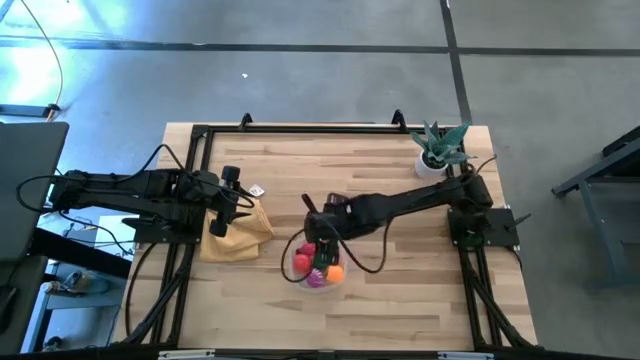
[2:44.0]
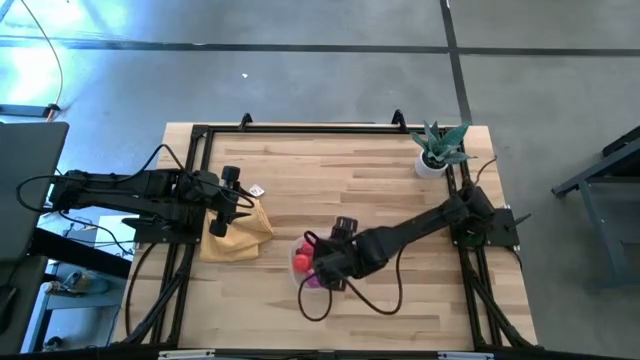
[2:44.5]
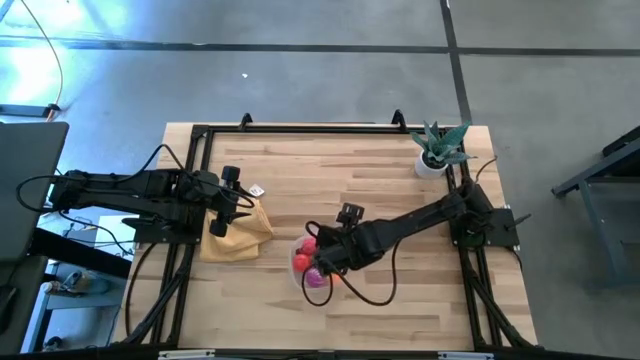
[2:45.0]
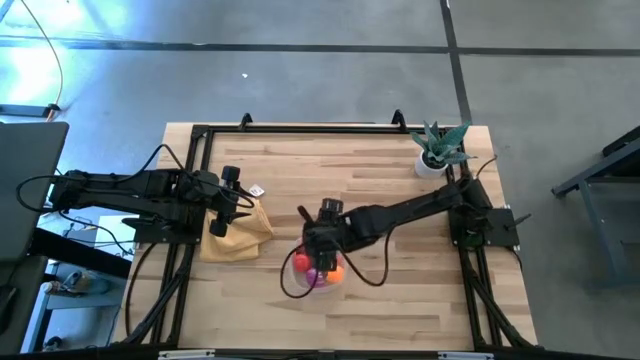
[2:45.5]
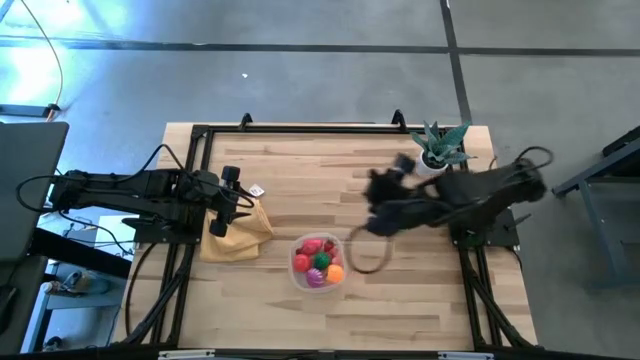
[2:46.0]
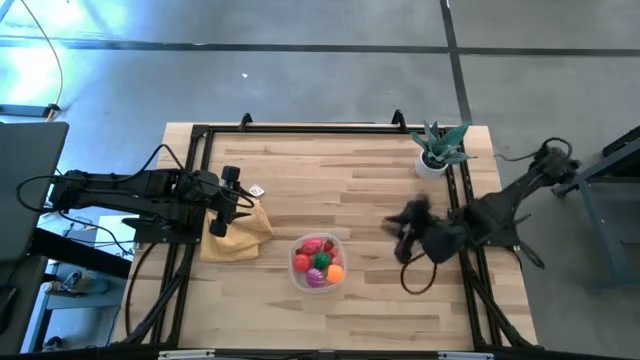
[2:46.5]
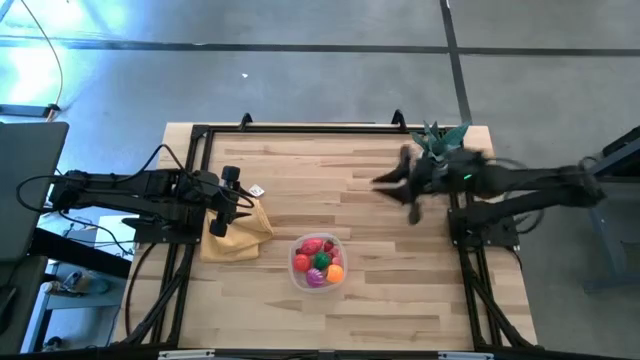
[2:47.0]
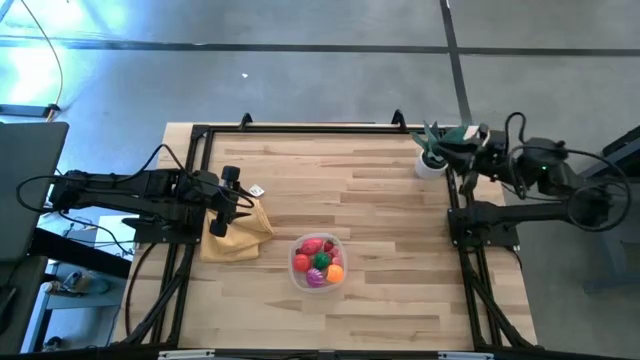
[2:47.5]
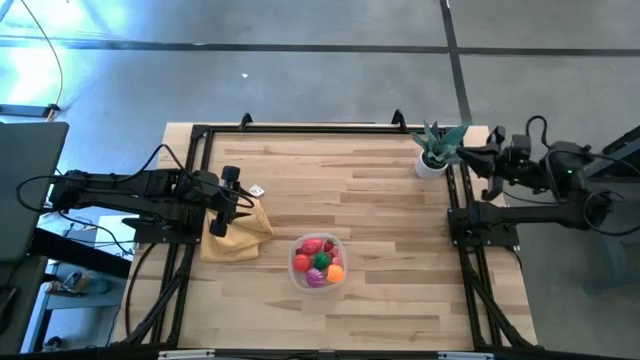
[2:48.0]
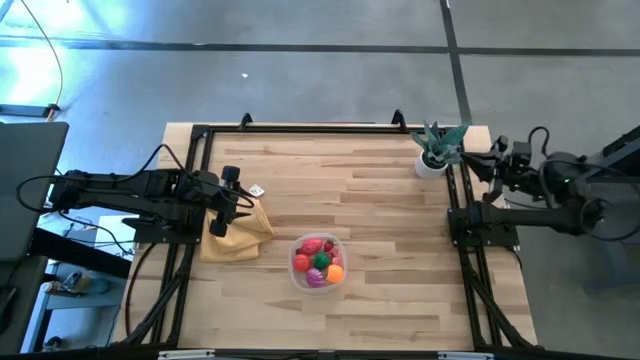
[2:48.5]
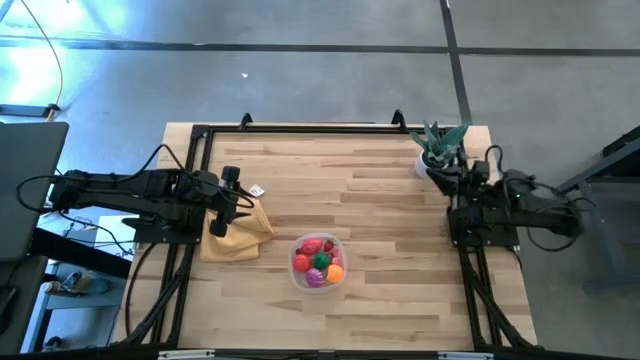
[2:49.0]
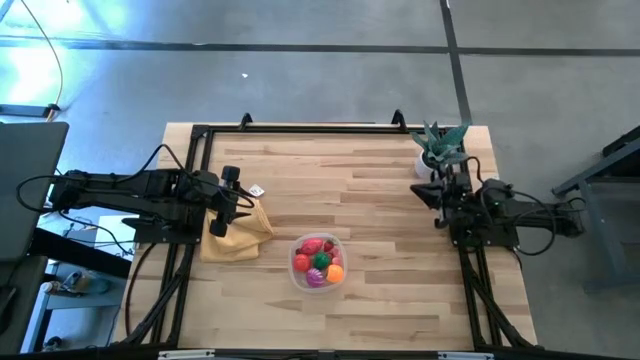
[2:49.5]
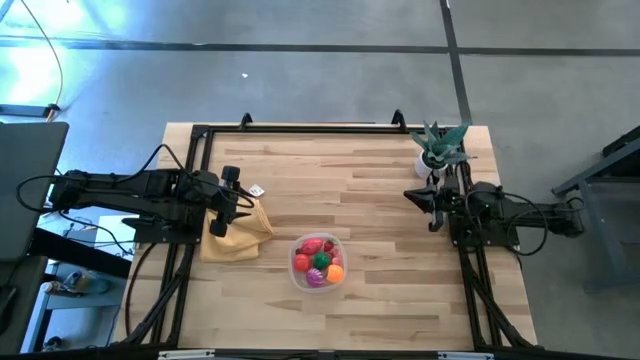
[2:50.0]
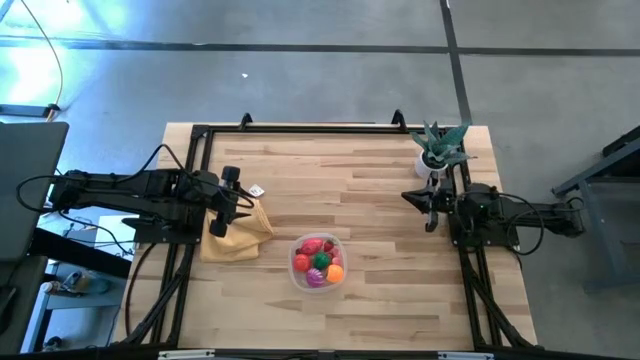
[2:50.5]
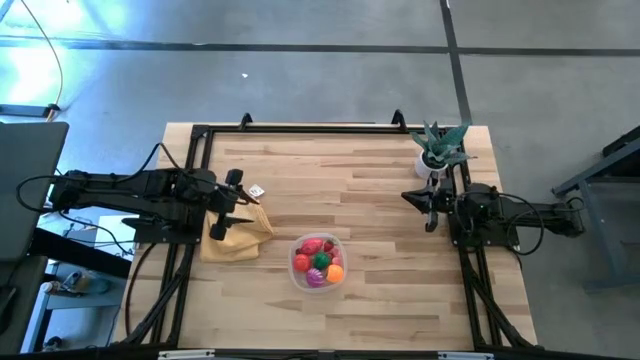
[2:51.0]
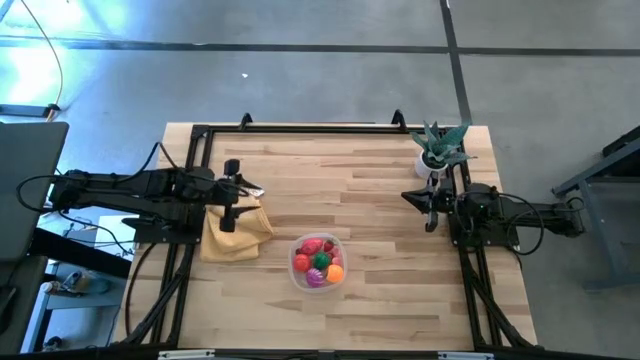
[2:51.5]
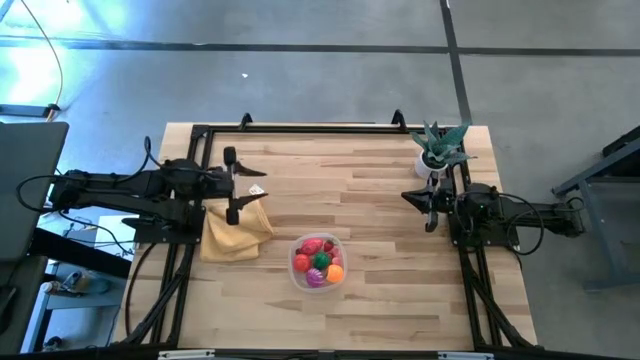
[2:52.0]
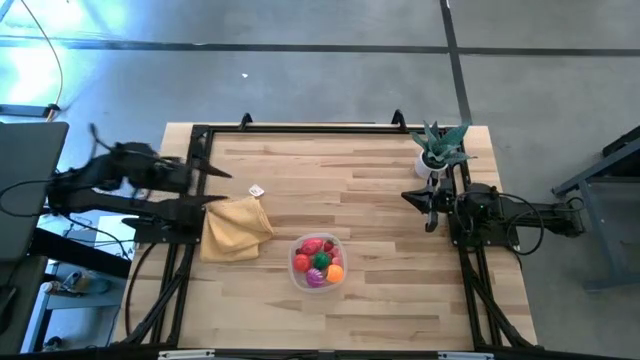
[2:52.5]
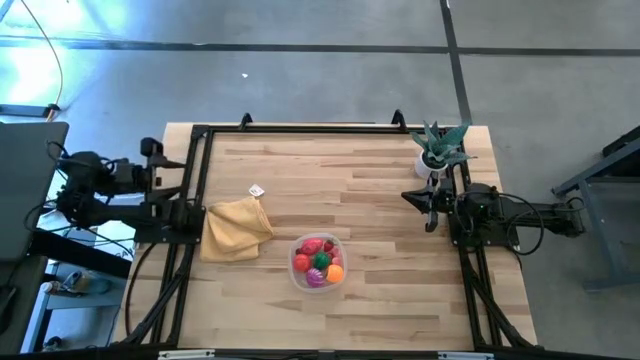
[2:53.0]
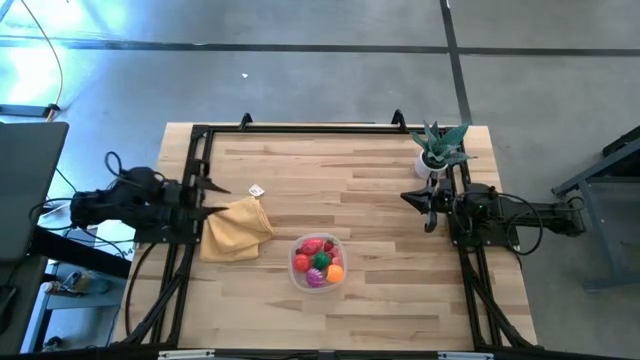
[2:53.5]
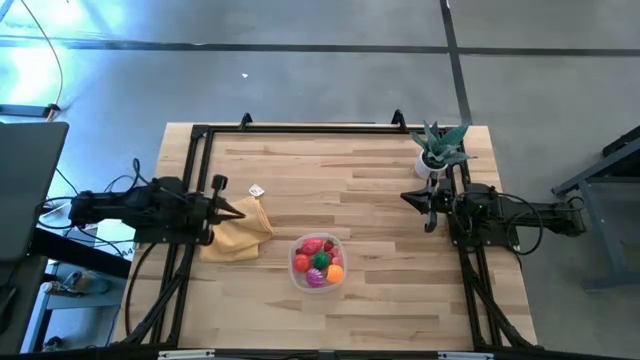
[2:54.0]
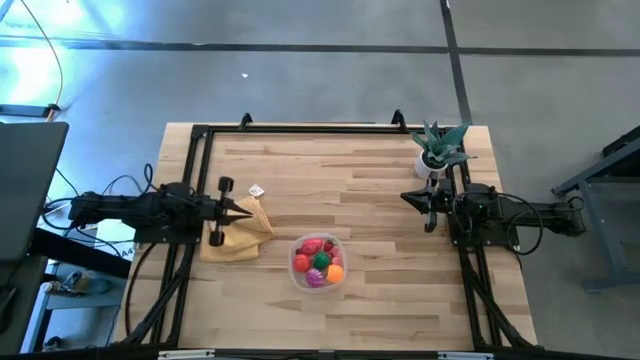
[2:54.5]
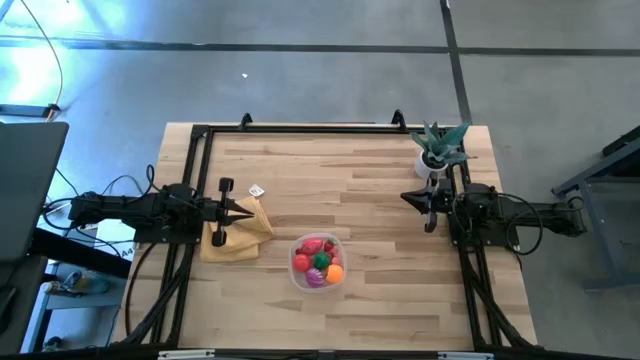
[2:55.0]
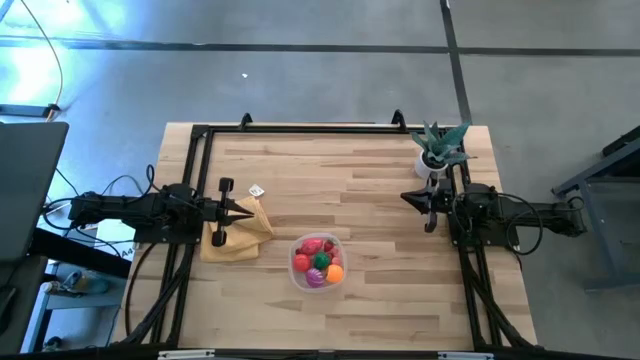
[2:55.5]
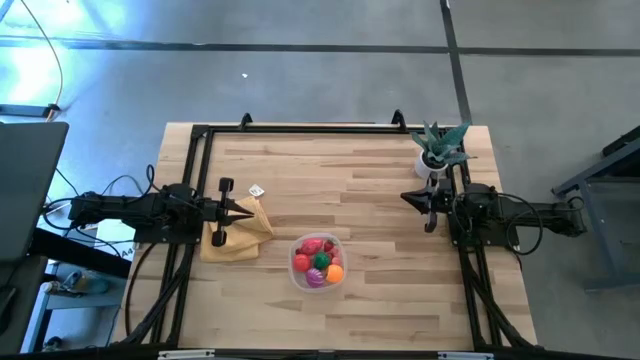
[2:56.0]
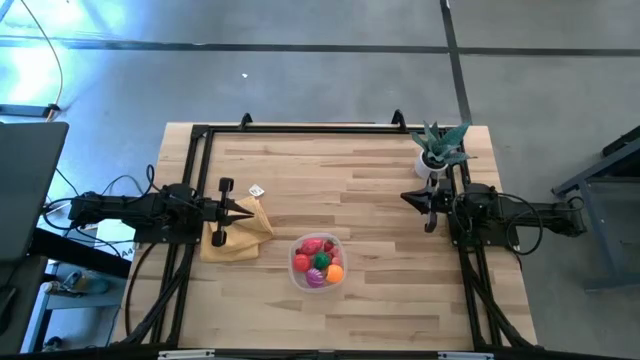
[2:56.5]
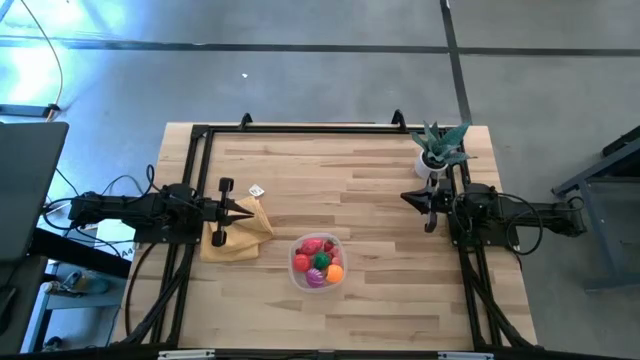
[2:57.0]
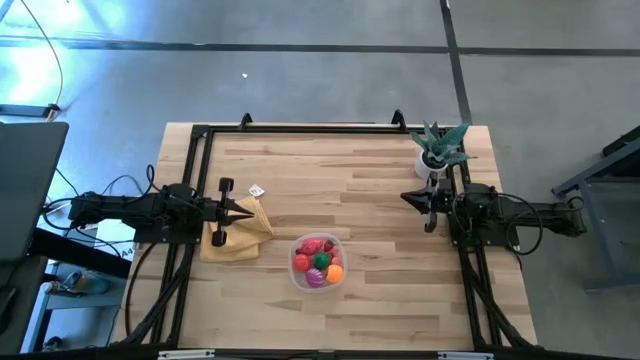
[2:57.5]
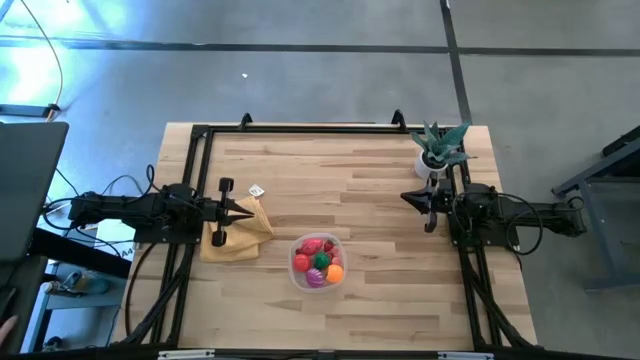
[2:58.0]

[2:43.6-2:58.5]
Task: Pick and placing Produce into tupperware
Return to Home Position

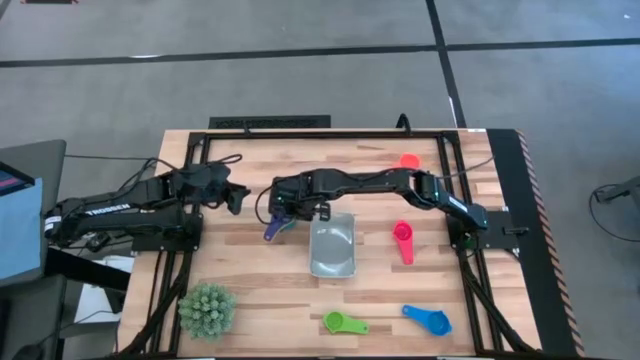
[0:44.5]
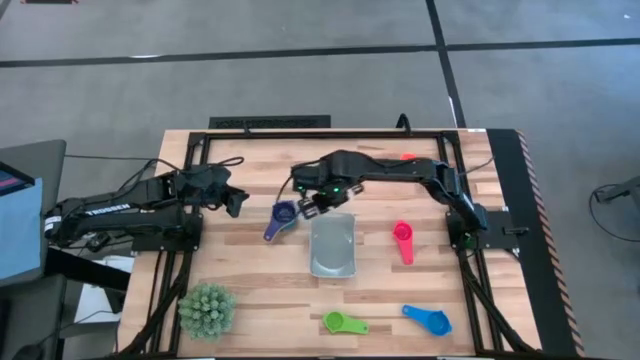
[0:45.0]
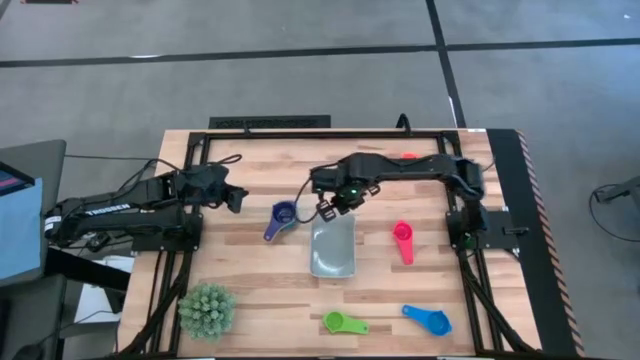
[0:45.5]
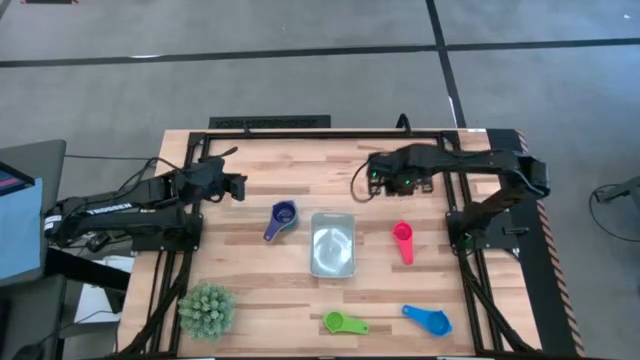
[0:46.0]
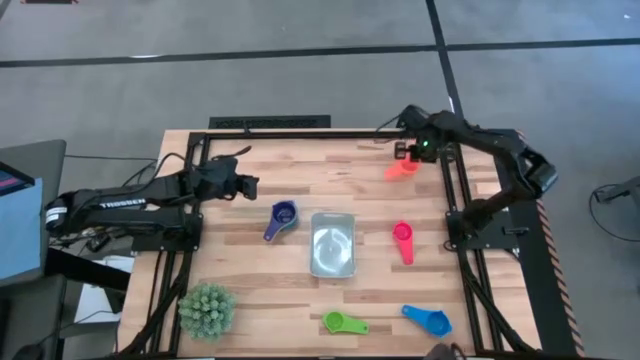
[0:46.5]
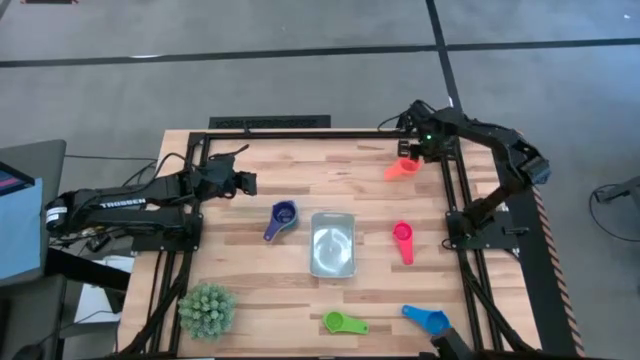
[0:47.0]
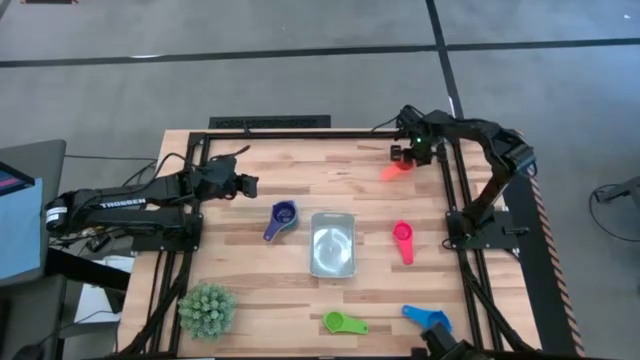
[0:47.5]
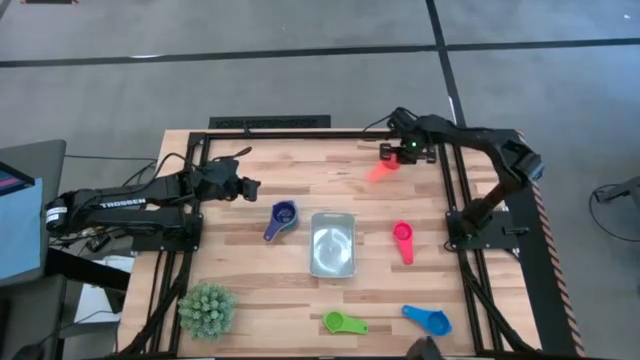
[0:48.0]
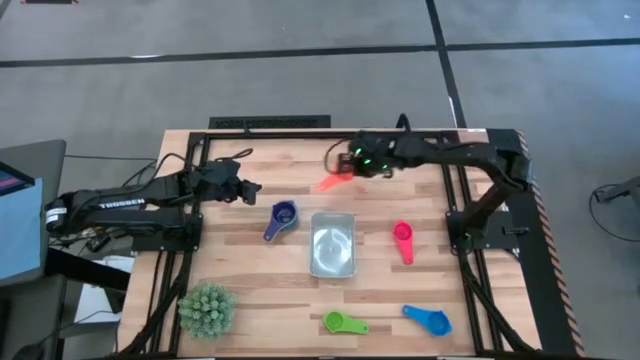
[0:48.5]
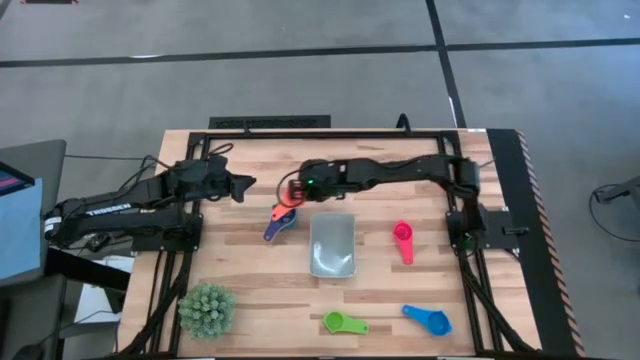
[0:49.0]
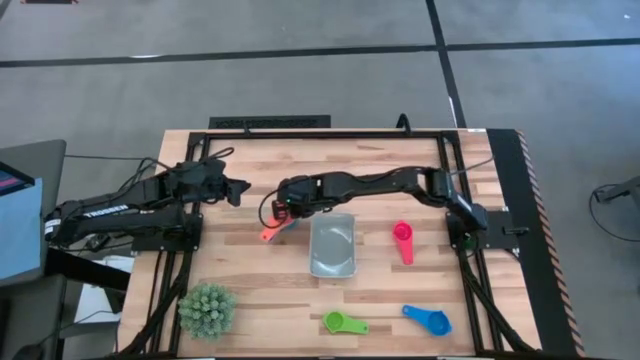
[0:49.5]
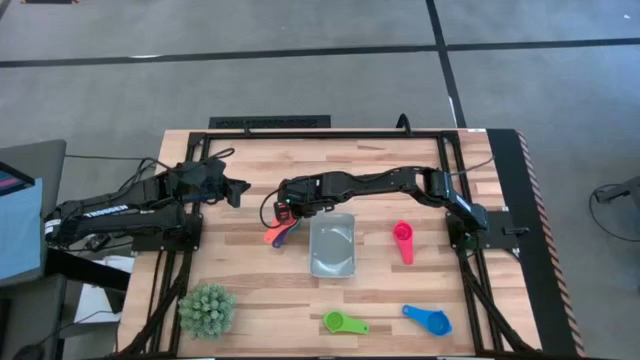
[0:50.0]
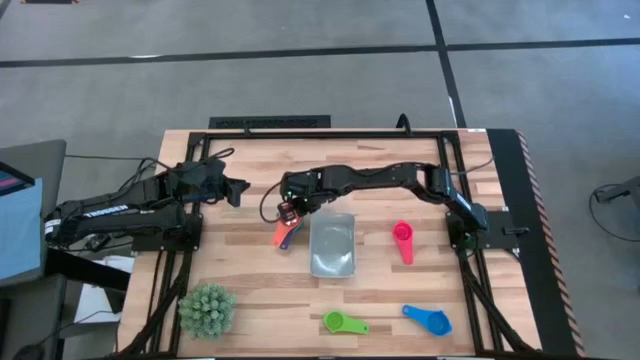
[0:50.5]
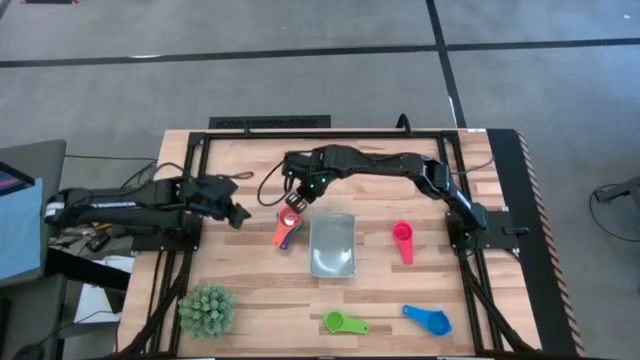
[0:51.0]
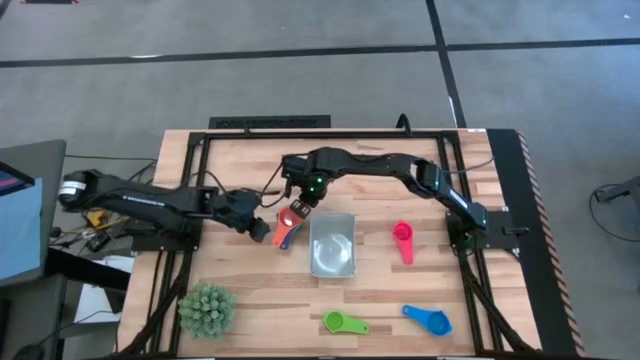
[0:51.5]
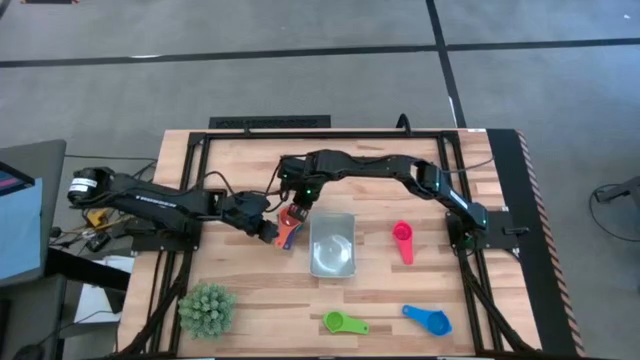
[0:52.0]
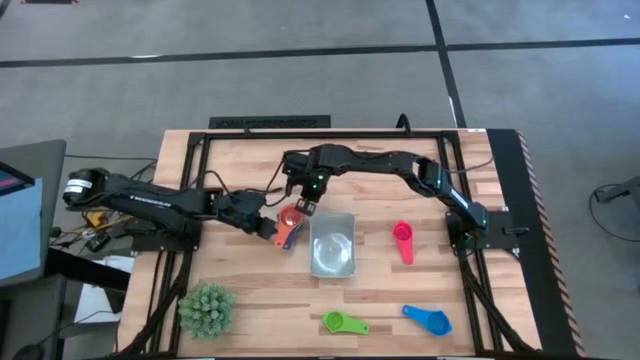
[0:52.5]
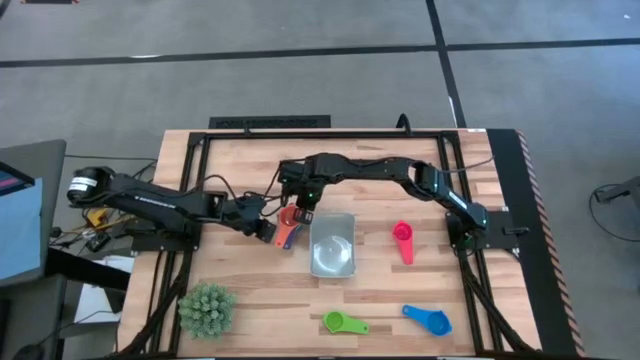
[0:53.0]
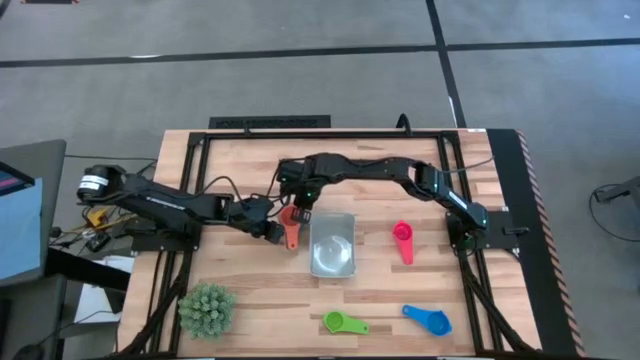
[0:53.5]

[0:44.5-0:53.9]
Task: Nest measuring cups in basket
Stack the orange measuring cup on top of the dark blue measuring cup
